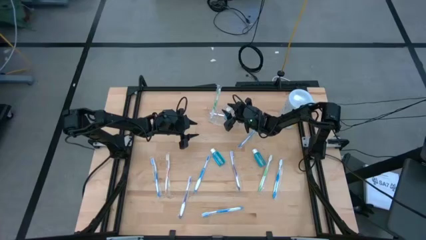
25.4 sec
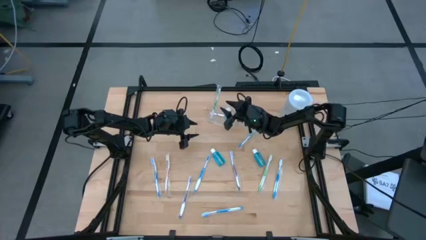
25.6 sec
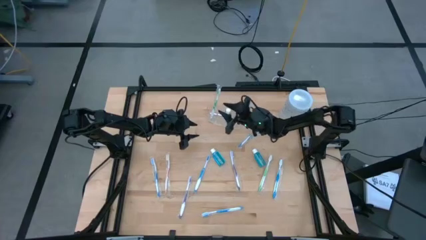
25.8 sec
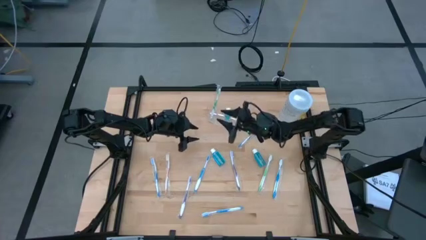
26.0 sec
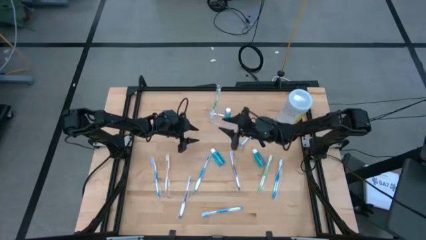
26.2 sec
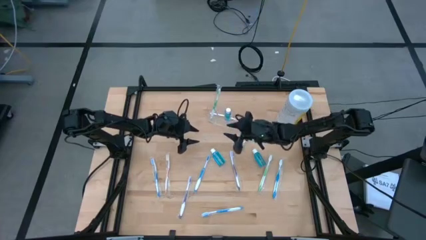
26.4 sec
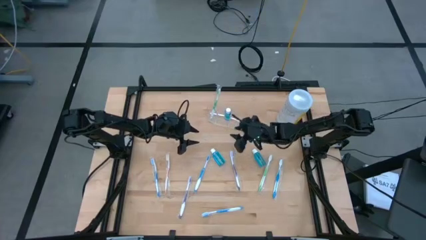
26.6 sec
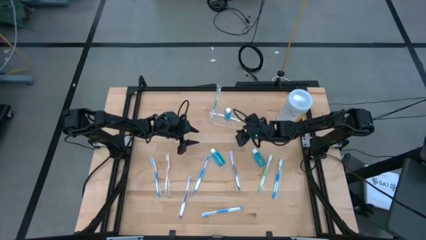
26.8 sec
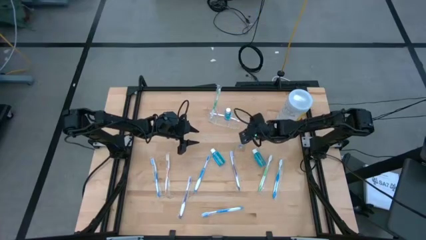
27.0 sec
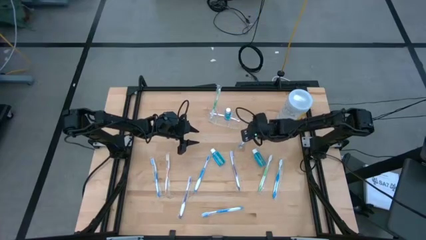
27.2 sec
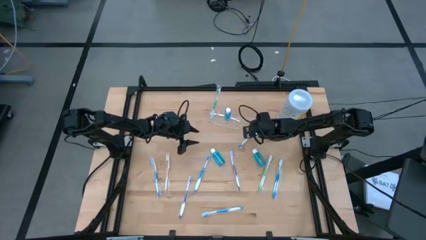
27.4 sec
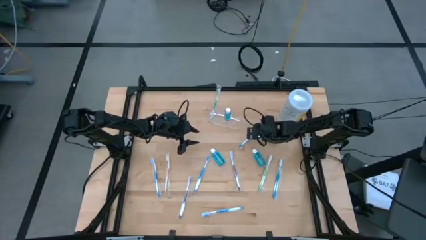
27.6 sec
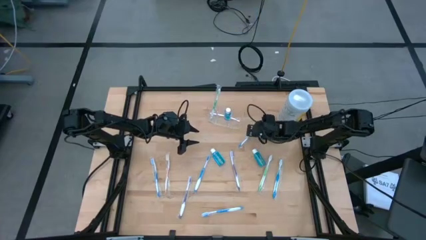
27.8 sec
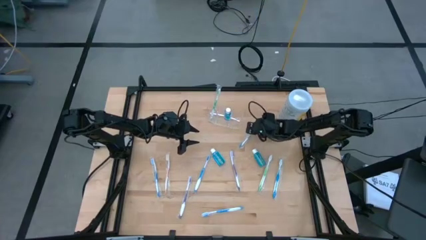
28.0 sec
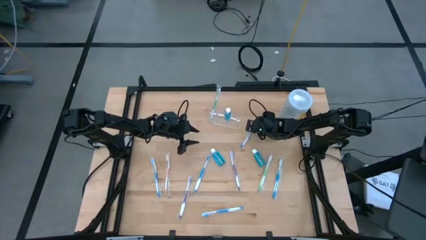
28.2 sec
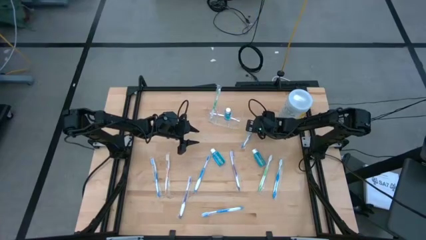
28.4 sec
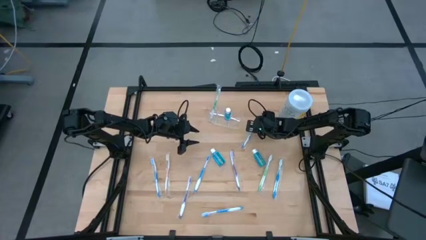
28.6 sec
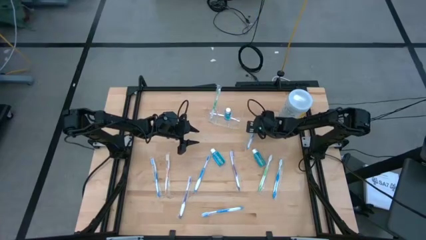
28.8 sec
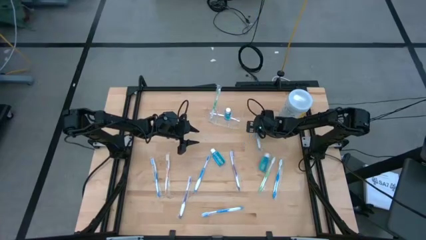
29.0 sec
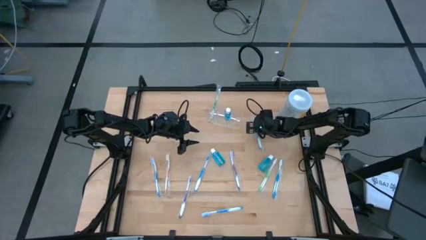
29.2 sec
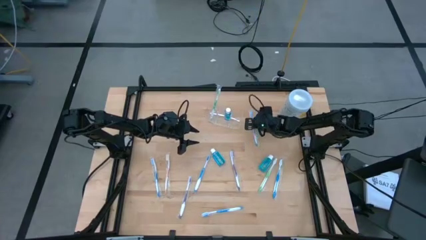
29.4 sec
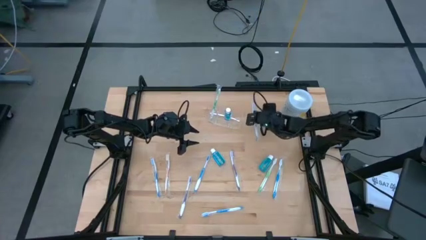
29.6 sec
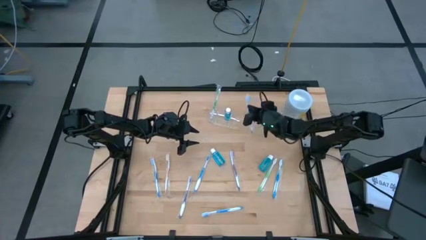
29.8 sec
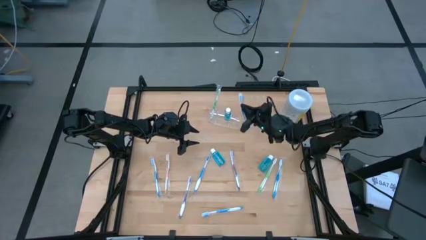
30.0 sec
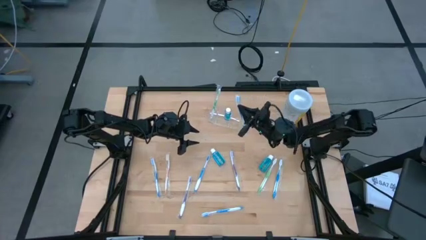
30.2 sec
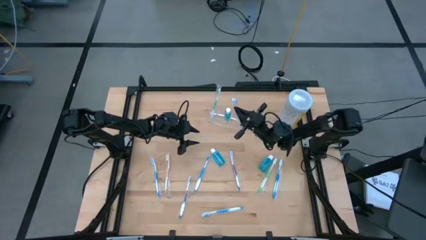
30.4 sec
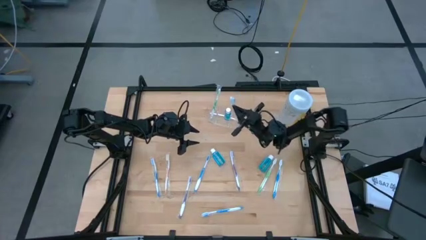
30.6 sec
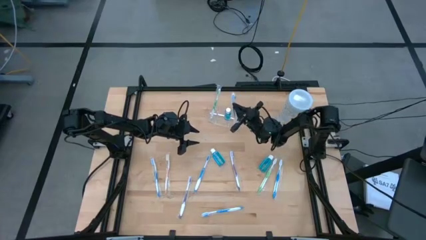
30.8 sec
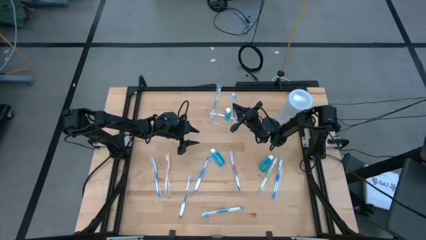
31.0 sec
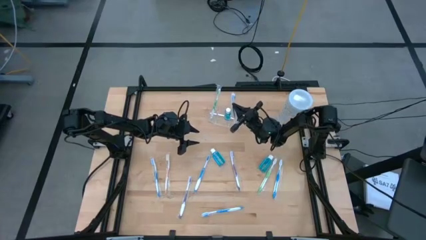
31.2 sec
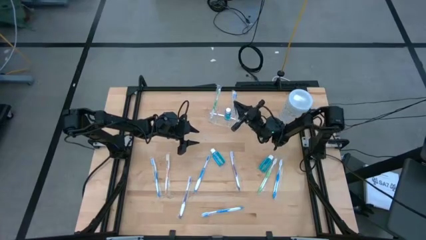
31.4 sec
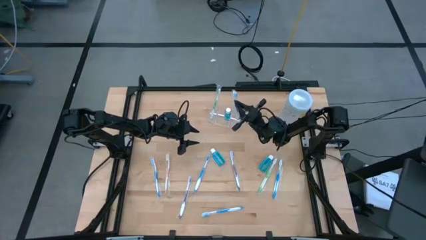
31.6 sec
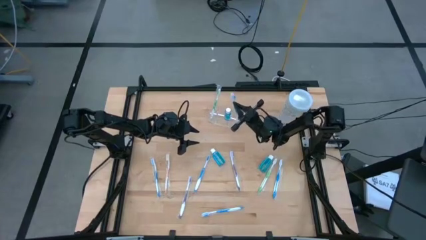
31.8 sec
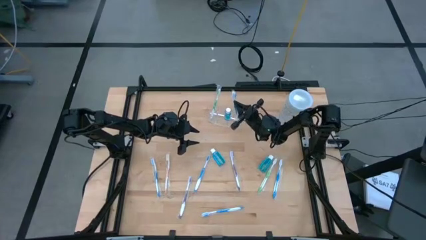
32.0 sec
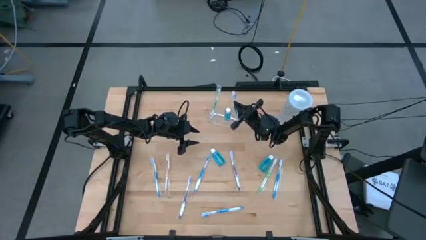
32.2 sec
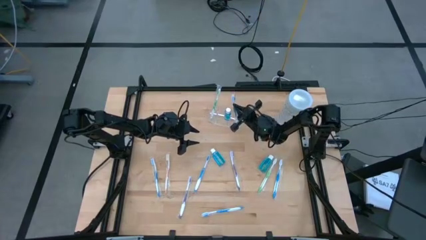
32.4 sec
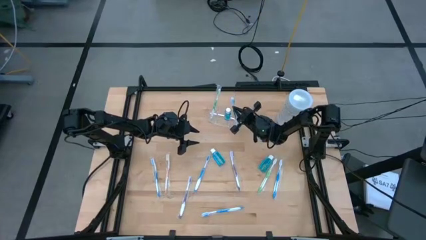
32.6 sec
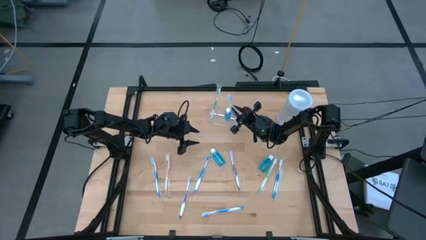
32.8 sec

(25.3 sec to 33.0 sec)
Task: Pick & Place toothbrushing station
Put the blue toothbrush into the right section of the transparent organizer

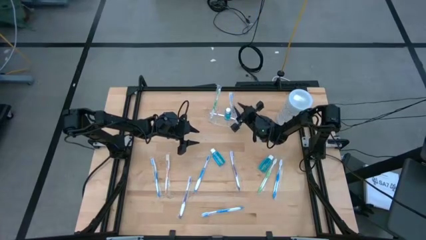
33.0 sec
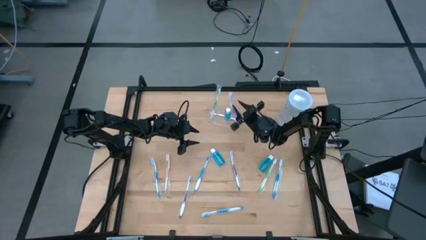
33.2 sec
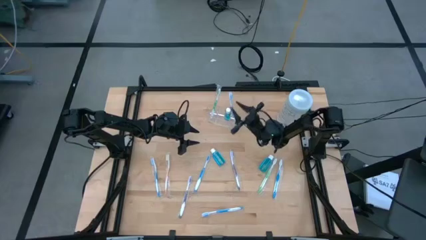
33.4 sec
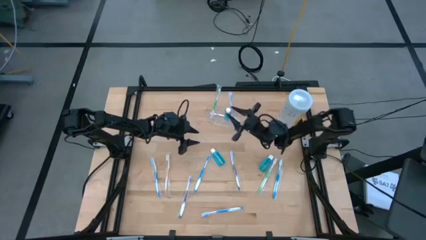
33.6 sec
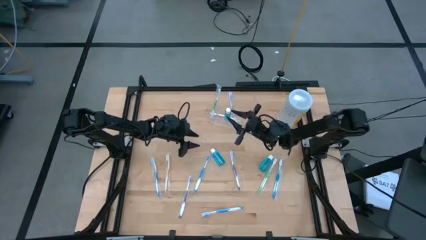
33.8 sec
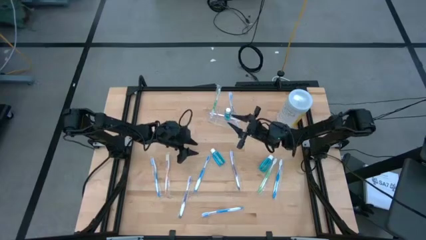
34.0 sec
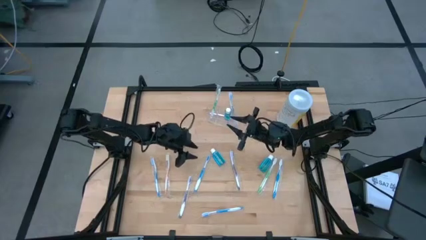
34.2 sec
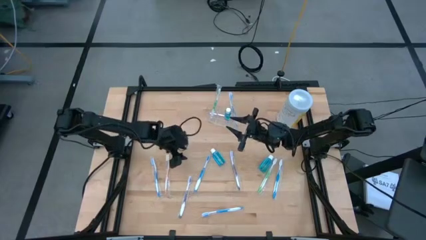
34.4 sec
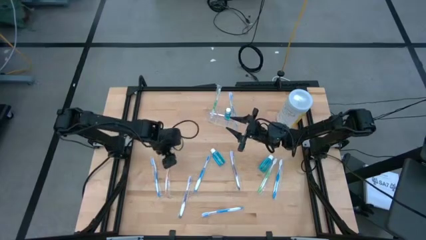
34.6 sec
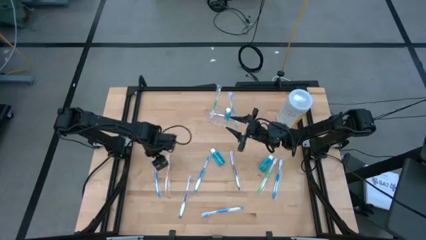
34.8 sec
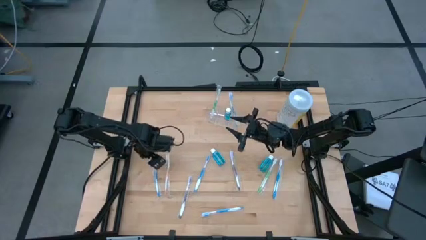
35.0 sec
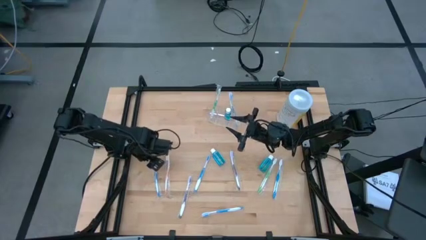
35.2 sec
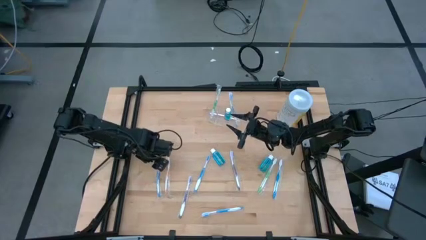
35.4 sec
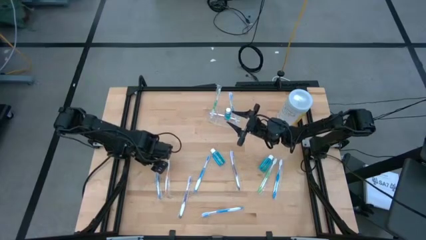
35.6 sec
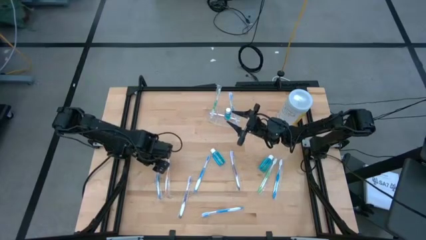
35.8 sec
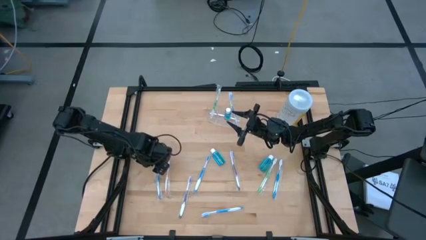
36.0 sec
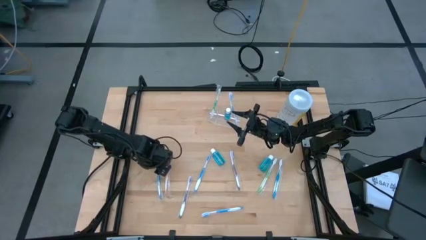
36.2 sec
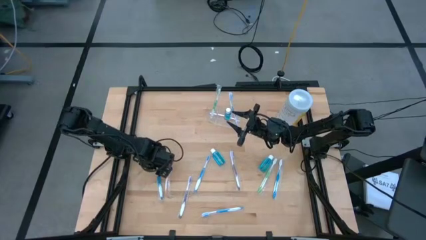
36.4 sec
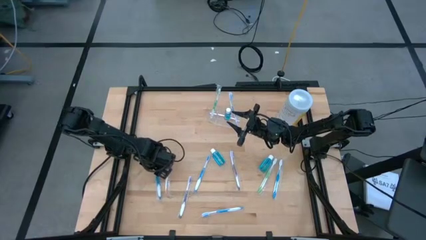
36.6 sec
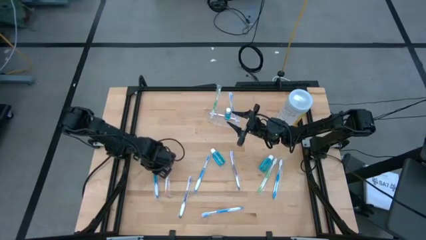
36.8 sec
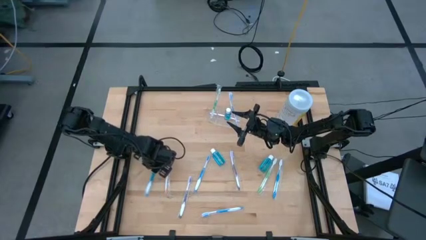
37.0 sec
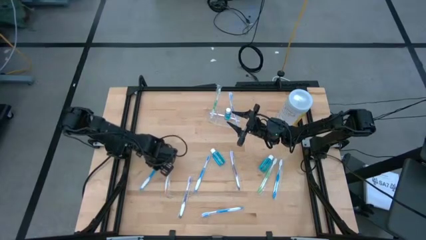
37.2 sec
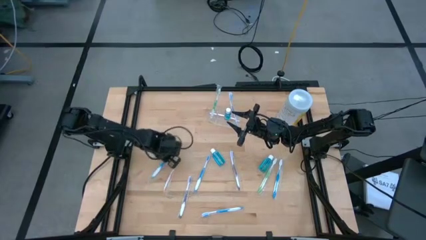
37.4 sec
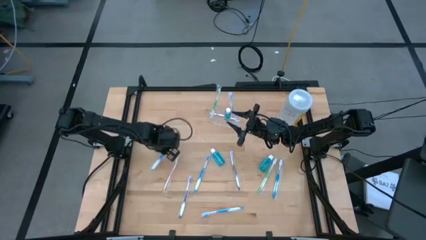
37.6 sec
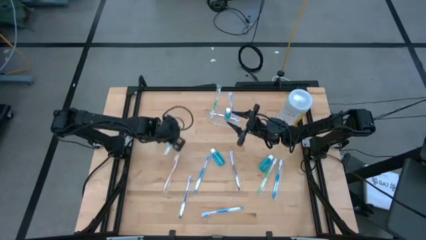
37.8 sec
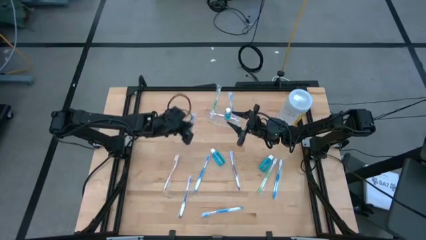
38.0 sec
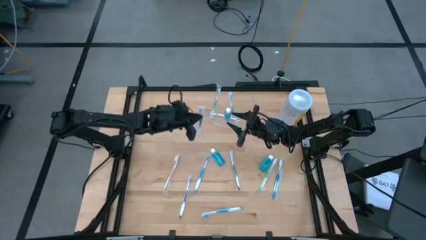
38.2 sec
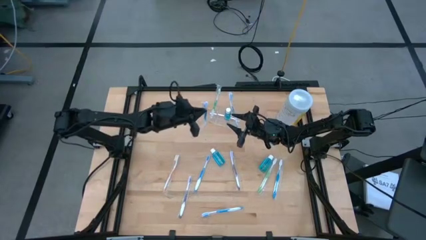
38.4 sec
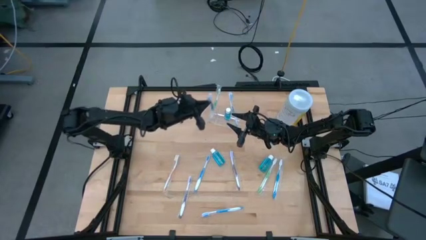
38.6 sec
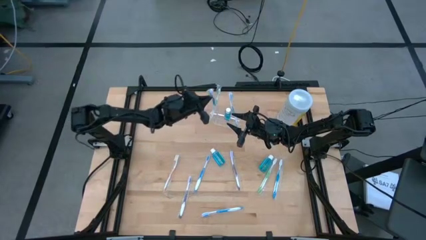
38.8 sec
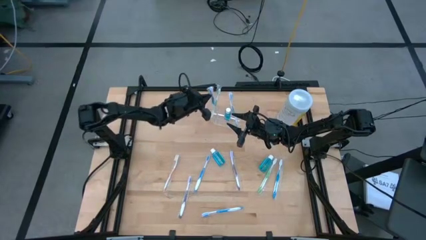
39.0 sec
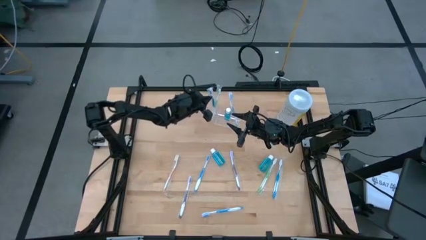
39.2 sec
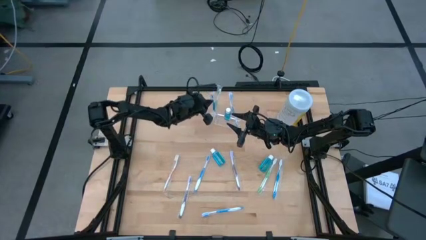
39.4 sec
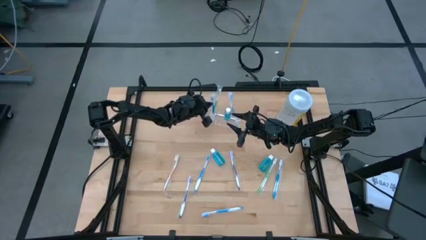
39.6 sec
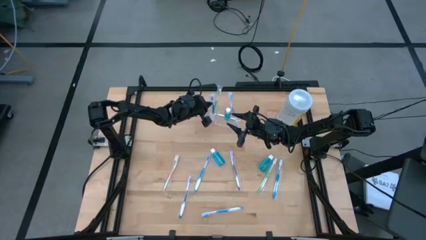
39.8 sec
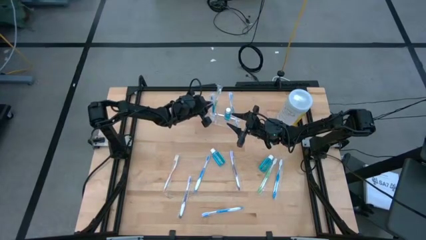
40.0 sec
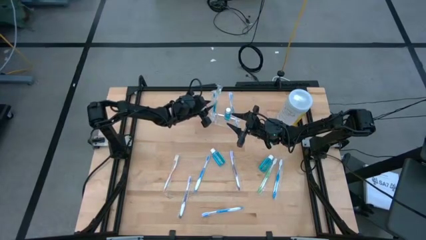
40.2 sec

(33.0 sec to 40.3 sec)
Put the blue toothbrush into the left section of the transparent organizer
